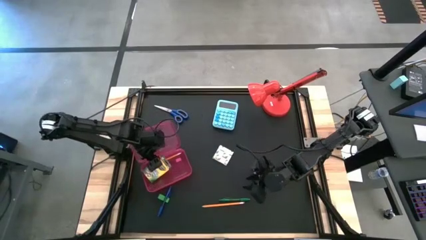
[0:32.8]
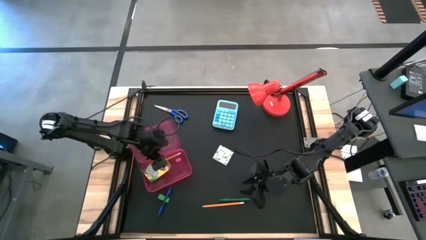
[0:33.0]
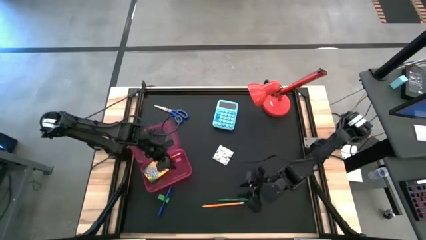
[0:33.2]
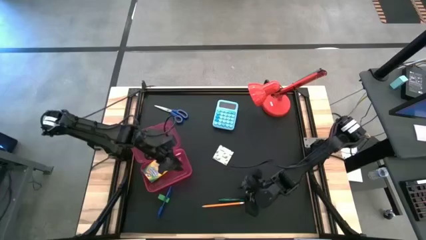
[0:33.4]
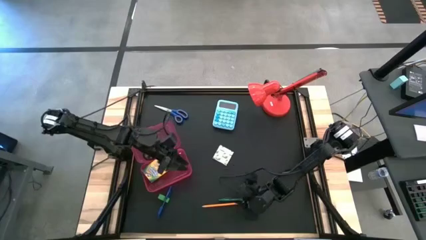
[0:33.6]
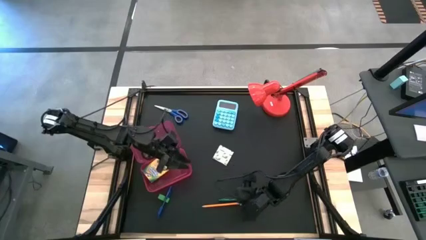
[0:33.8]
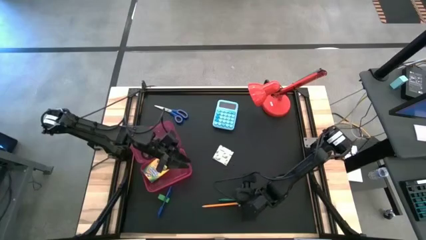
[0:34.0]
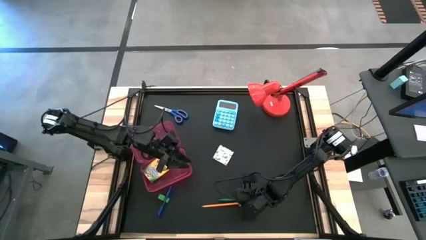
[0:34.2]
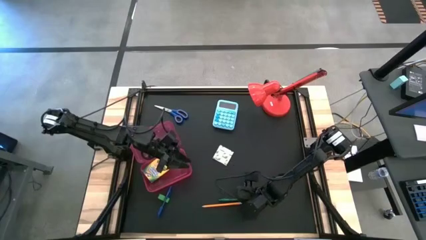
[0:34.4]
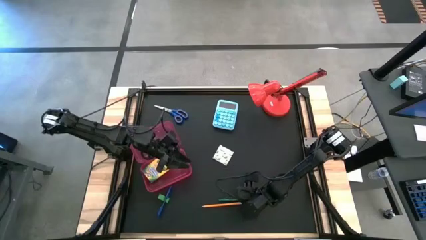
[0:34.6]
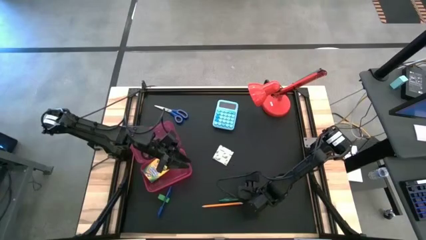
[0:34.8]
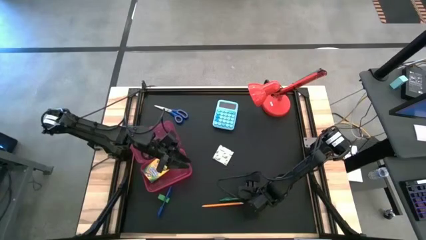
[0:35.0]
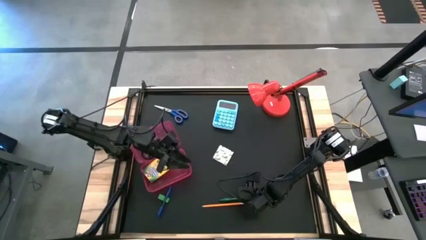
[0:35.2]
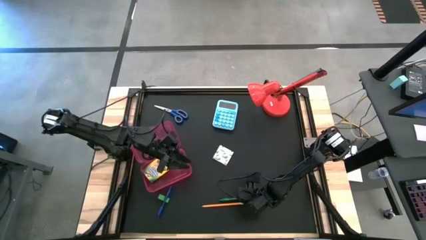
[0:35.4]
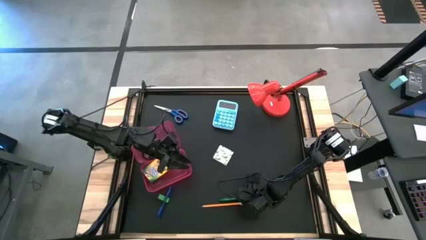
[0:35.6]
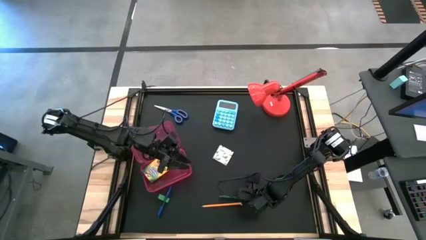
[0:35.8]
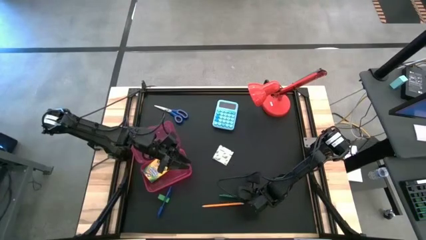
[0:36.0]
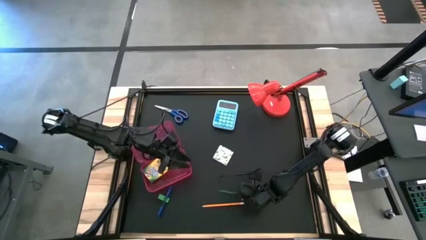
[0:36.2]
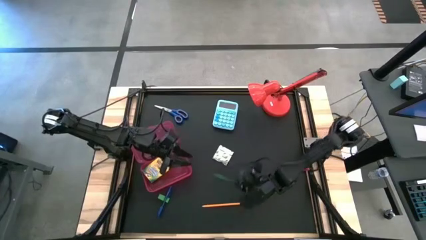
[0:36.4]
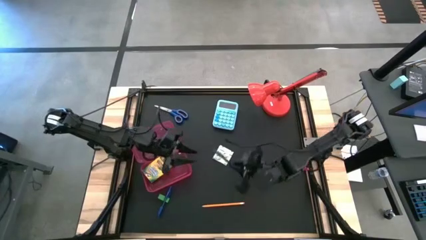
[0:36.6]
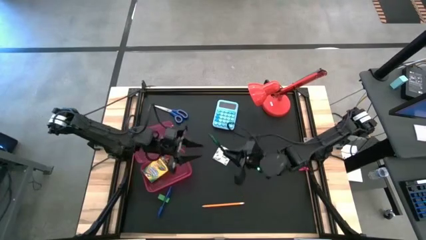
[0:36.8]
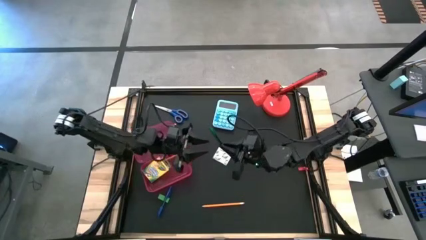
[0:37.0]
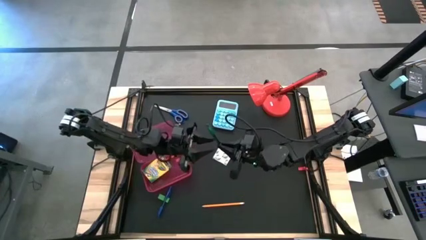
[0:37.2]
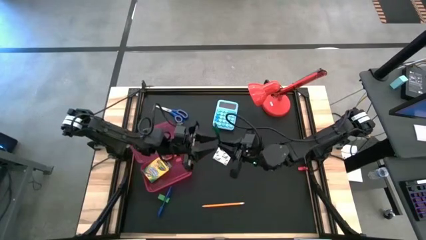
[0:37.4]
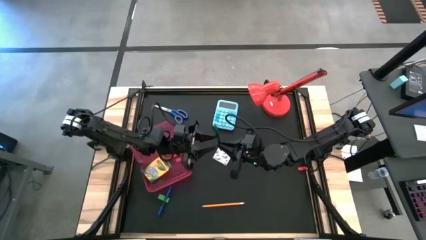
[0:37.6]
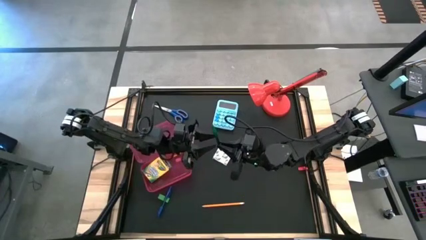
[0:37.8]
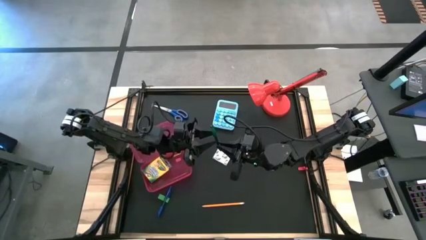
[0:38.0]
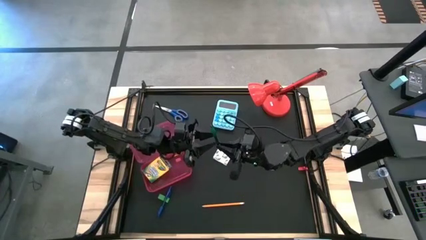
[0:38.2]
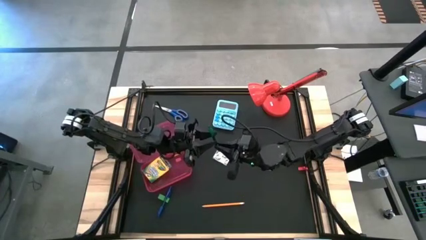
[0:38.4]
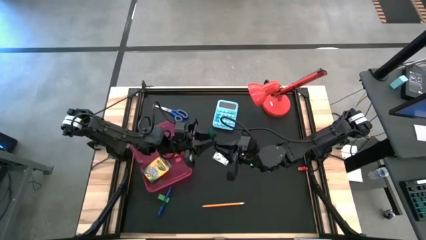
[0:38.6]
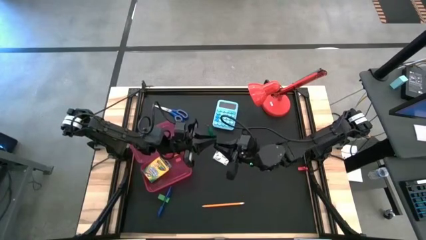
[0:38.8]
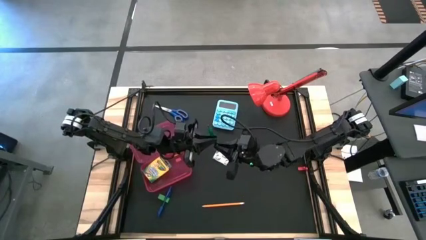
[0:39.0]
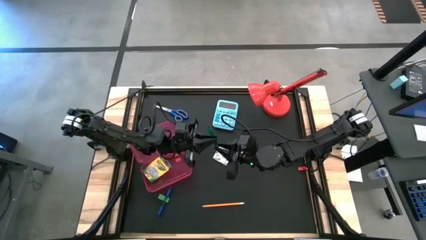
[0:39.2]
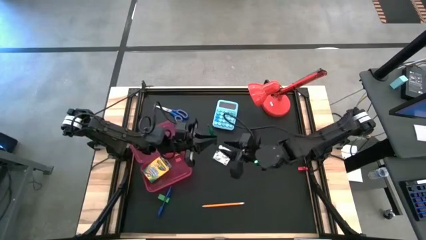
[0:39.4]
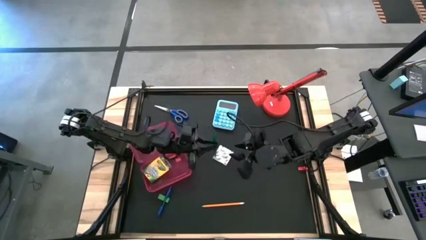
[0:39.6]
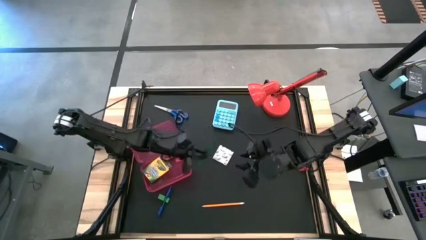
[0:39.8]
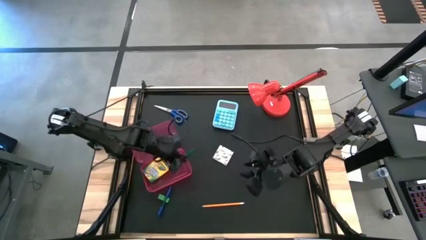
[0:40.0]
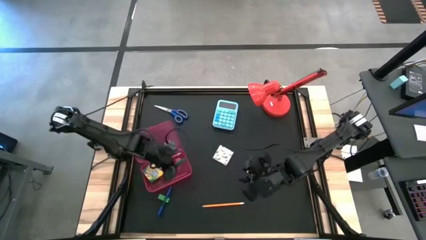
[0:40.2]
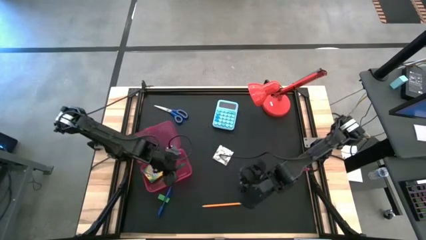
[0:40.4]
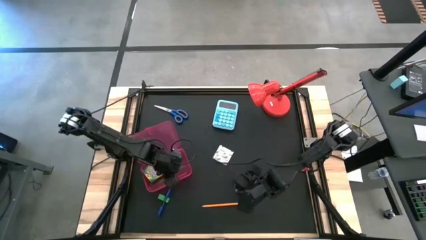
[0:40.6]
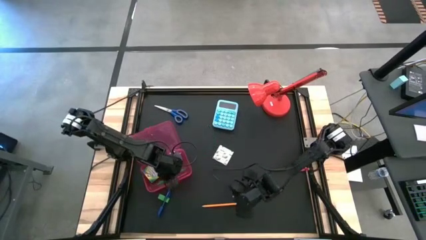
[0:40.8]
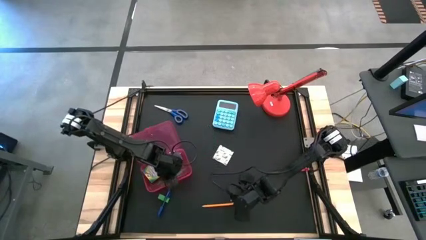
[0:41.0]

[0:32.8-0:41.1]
Task: Pack school essentials
Put the green pen into the red supply box

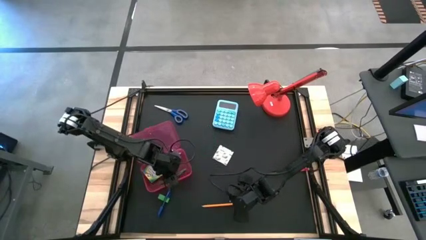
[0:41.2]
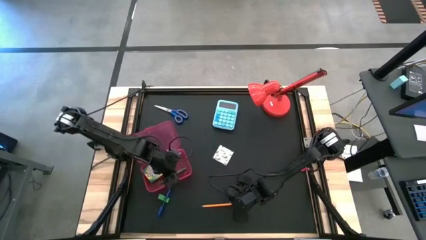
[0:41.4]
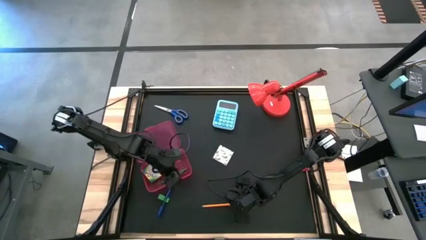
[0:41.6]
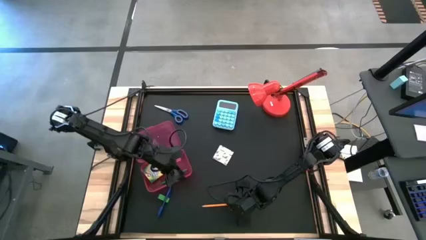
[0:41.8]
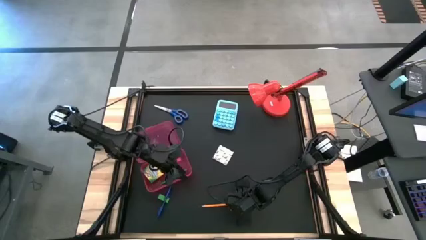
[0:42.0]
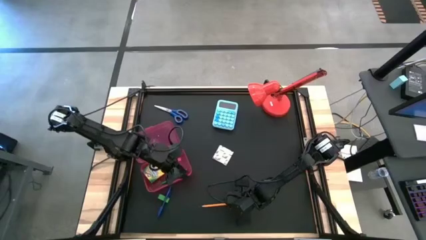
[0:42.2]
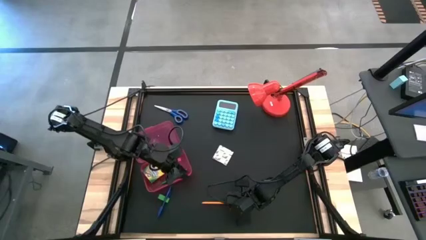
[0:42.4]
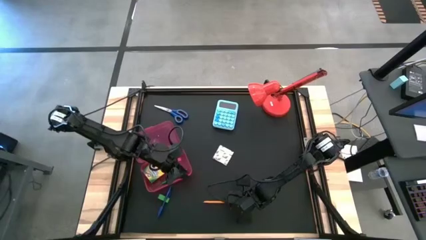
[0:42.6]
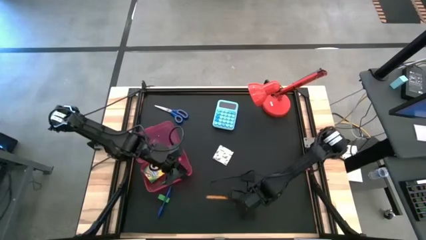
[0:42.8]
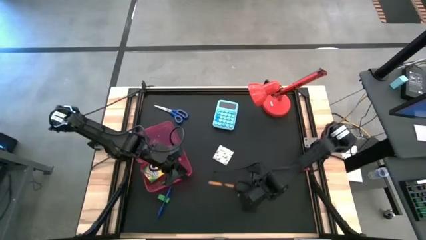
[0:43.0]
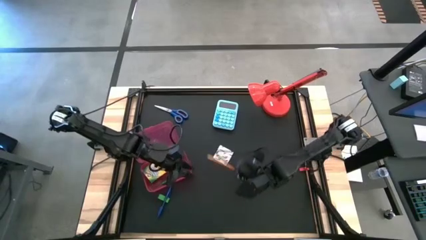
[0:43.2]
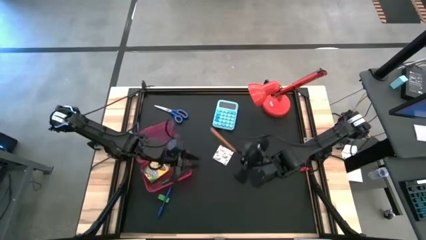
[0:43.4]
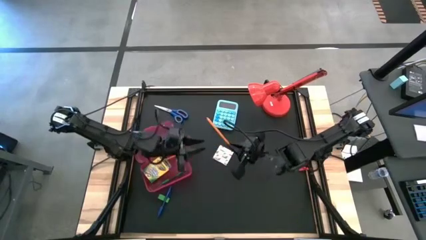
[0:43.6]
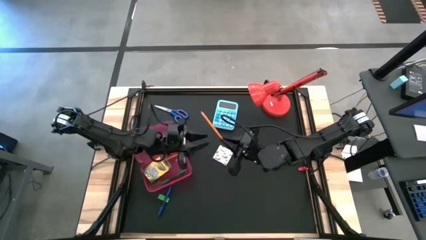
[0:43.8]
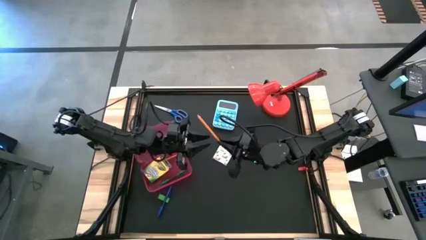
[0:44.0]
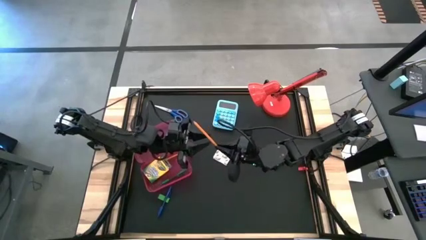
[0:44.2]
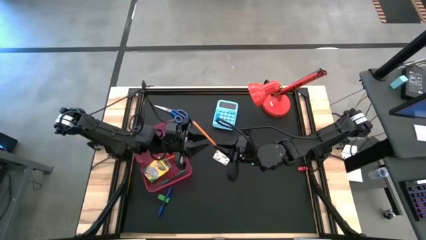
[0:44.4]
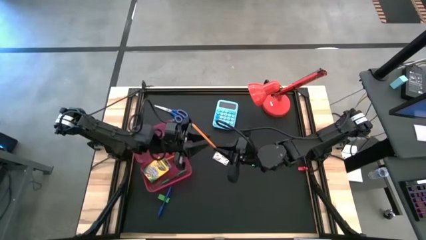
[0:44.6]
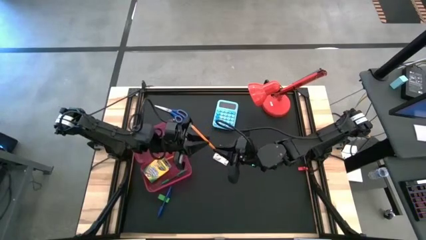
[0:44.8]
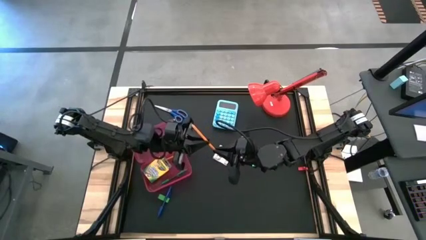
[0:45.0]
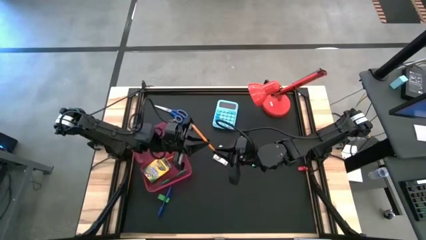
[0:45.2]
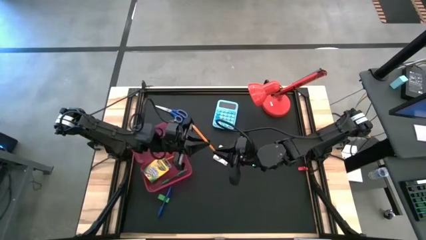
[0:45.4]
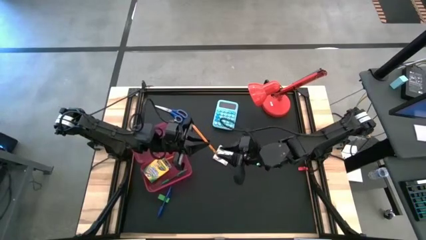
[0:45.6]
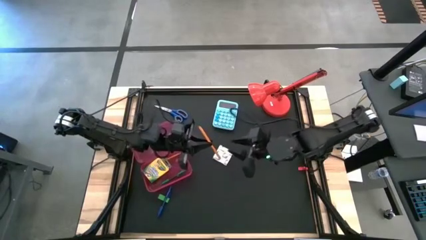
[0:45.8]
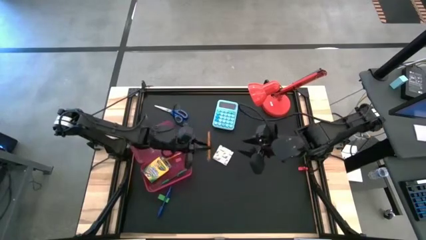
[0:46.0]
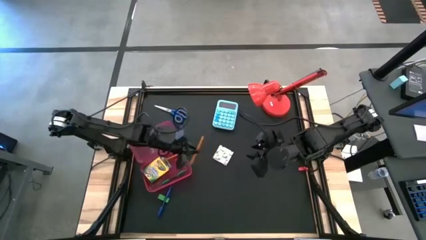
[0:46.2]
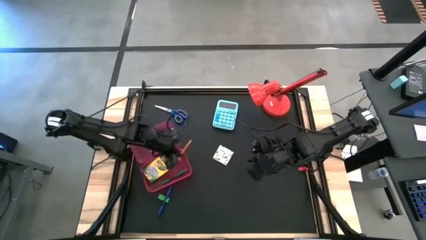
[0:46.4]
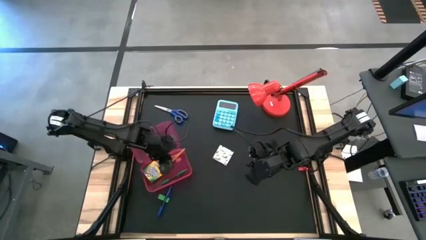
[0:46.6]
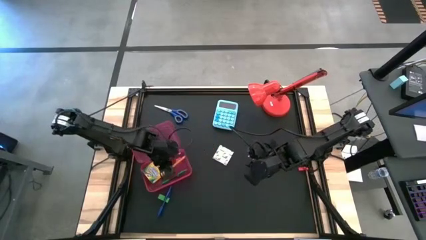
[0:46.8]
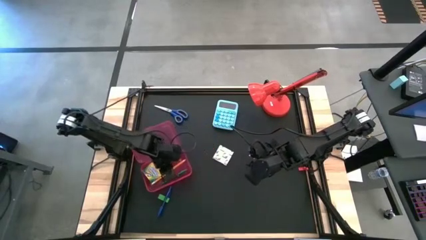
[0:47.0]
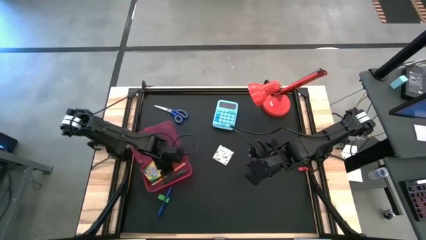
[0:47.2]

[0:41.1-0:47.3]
Put the orange pencil into the red supply box

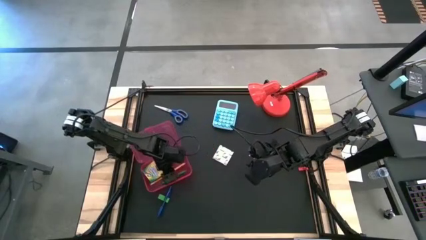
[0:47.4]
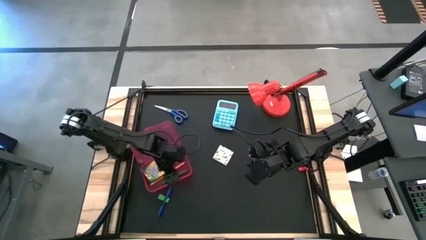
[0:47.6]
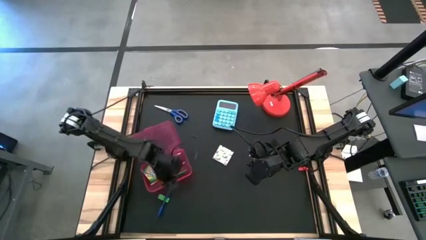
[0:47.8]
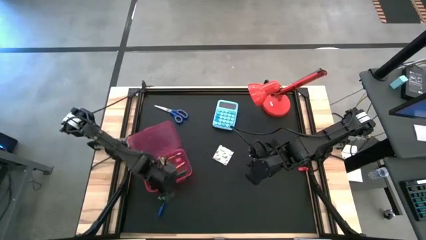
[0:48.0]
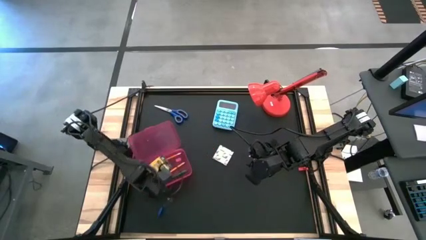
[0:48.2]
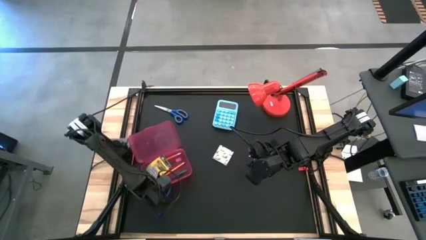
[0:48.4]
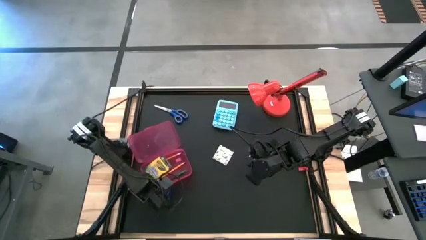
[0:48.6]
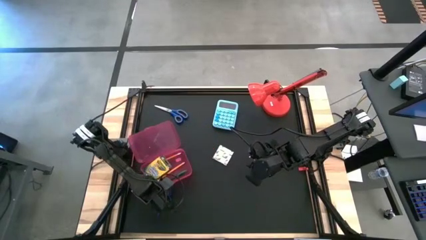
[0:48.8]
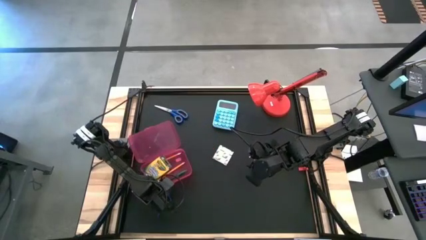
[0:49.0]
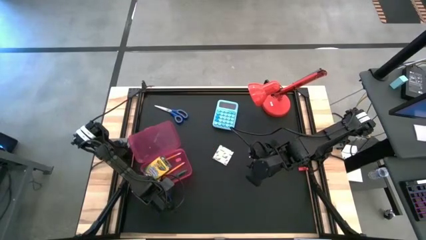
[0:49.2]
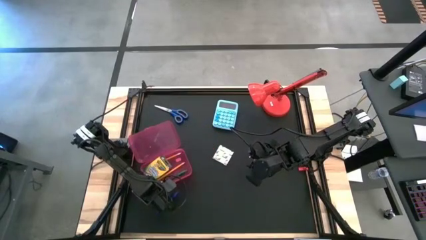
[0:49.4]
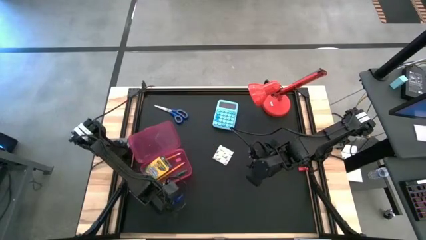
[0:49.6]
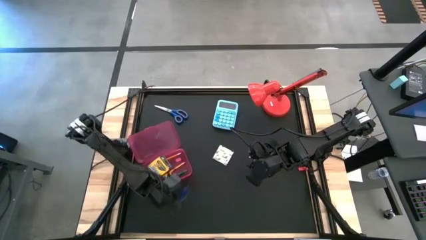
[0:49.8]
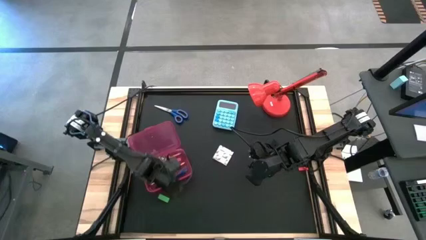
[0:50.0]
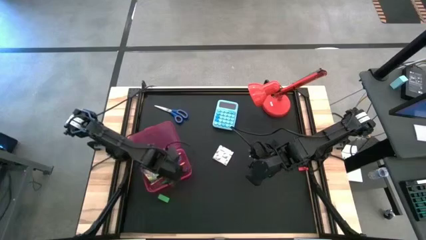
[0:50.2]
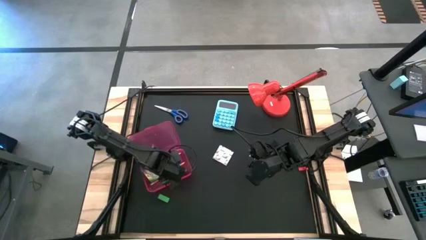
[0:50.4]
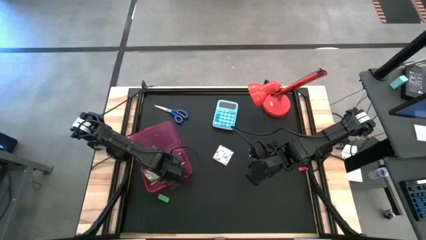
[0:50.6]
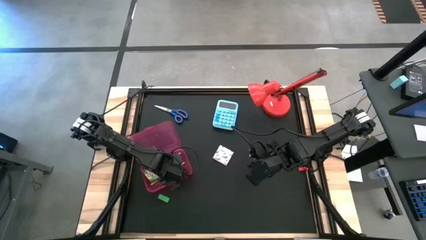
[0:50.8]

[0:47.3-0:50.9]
Put the blue pen into the red supply box
